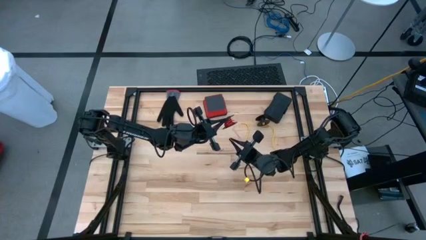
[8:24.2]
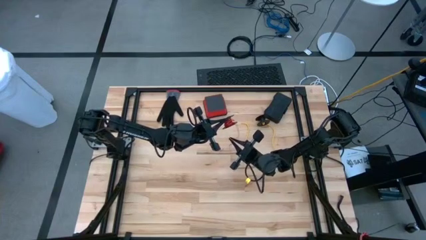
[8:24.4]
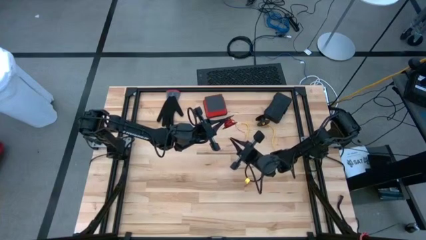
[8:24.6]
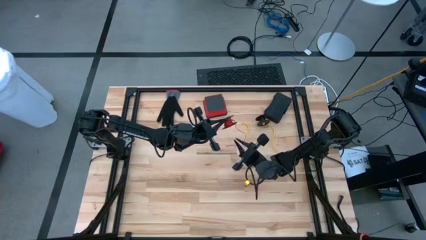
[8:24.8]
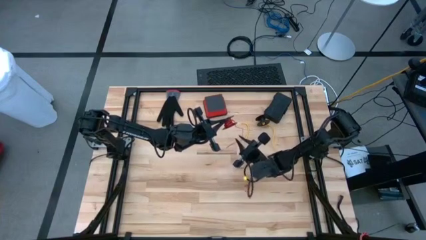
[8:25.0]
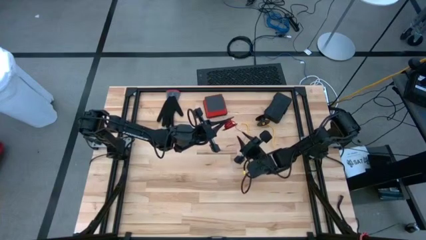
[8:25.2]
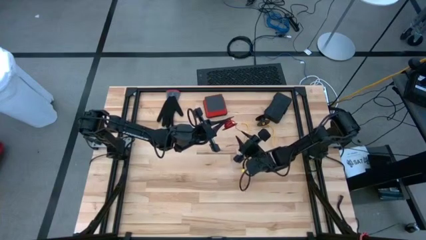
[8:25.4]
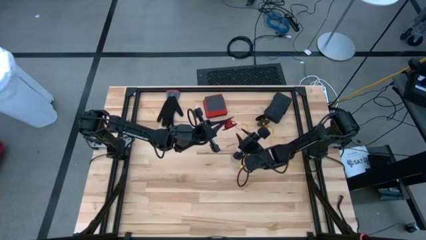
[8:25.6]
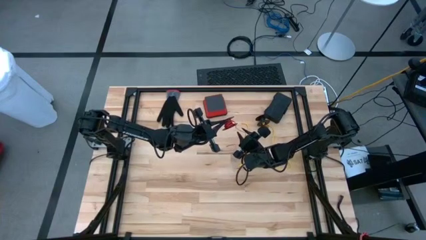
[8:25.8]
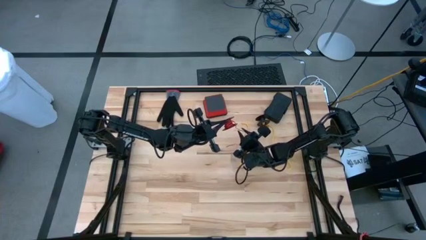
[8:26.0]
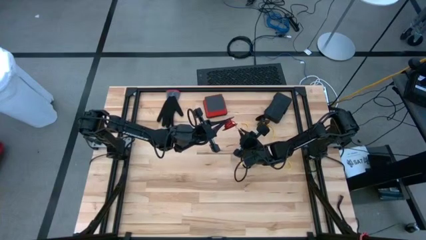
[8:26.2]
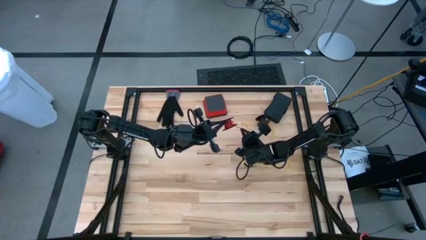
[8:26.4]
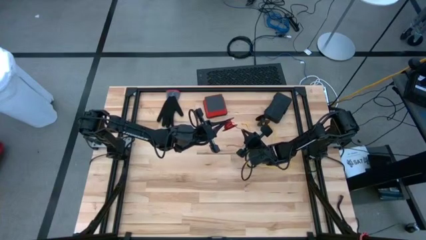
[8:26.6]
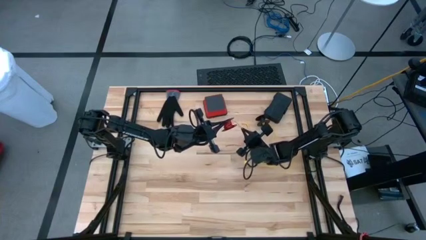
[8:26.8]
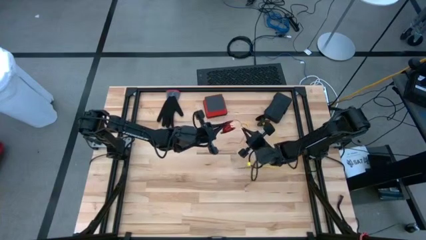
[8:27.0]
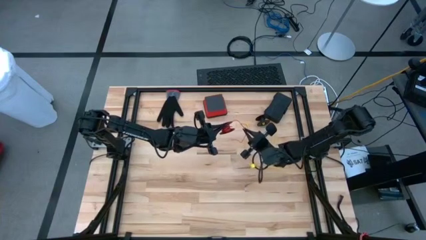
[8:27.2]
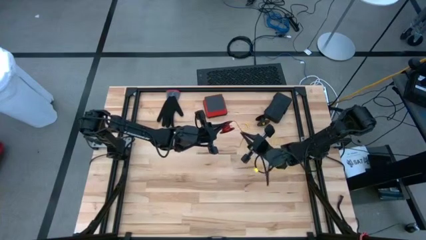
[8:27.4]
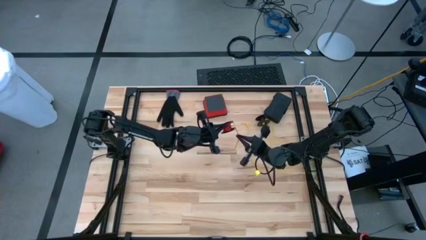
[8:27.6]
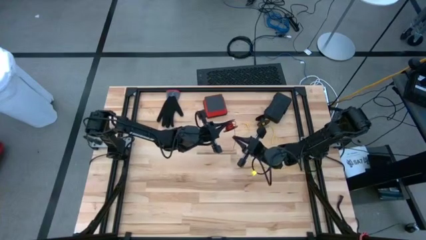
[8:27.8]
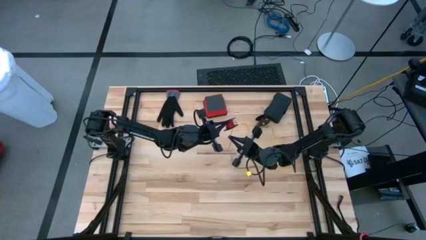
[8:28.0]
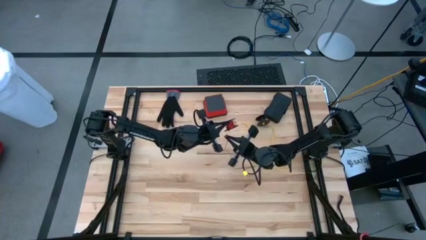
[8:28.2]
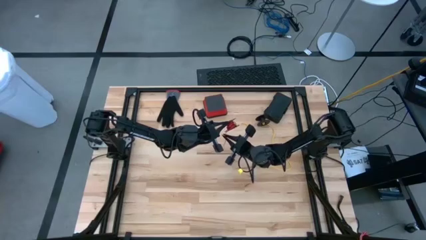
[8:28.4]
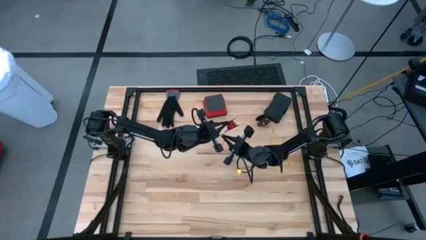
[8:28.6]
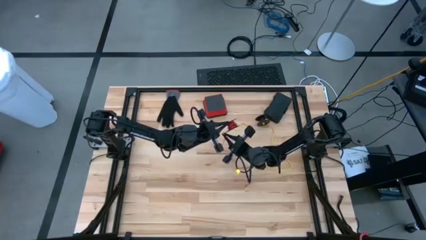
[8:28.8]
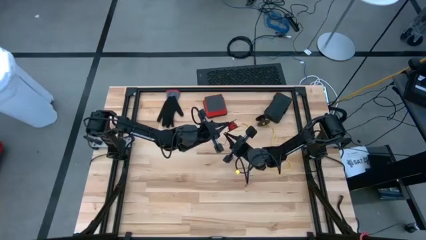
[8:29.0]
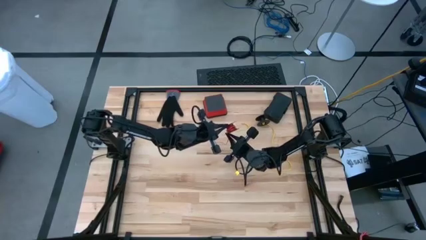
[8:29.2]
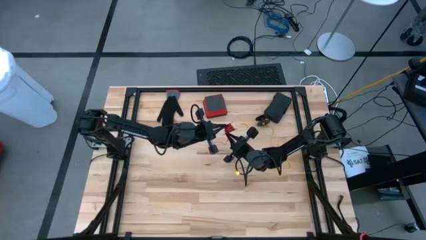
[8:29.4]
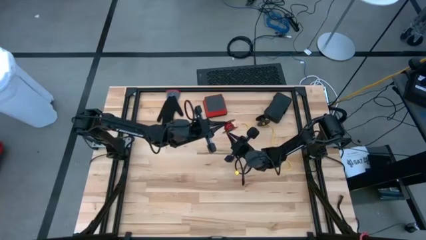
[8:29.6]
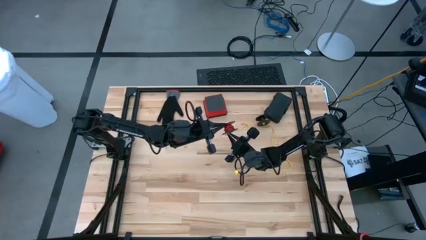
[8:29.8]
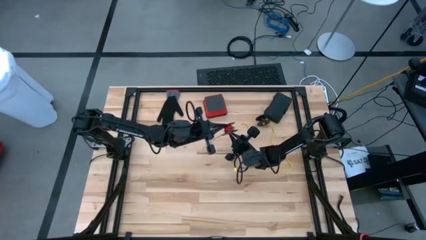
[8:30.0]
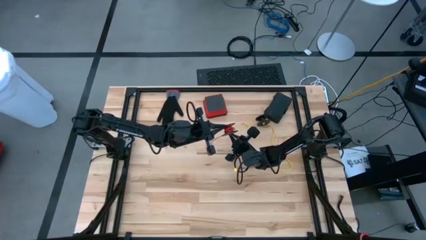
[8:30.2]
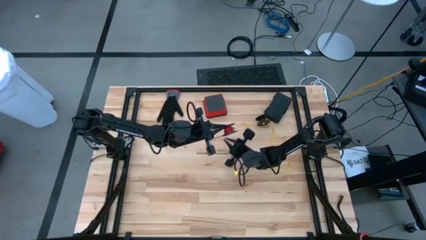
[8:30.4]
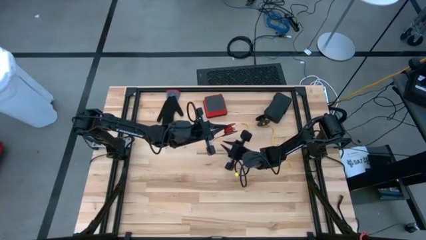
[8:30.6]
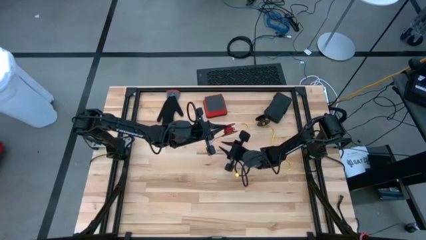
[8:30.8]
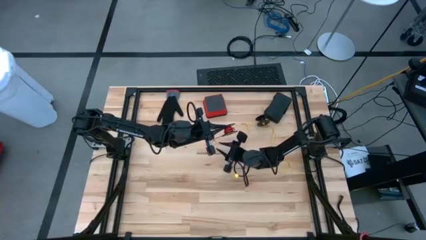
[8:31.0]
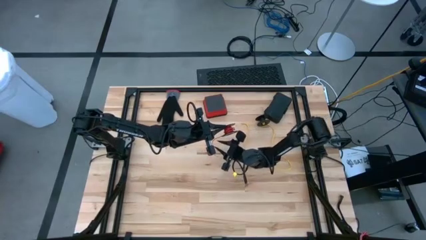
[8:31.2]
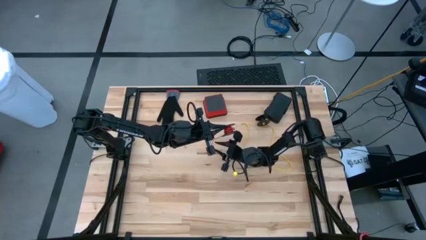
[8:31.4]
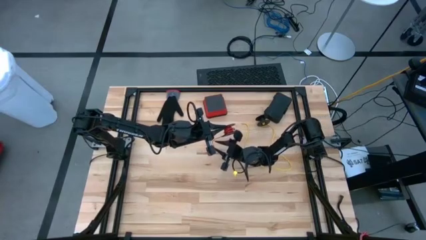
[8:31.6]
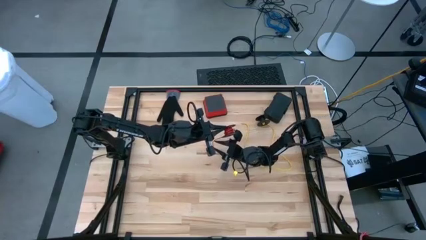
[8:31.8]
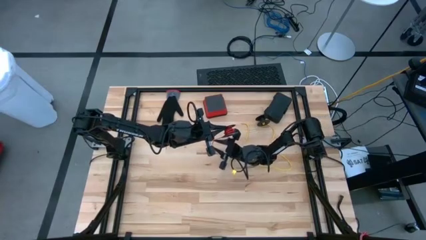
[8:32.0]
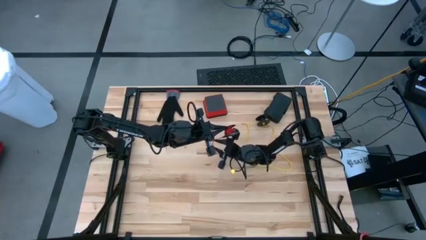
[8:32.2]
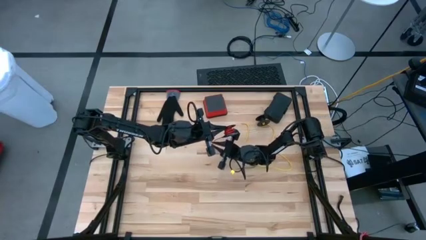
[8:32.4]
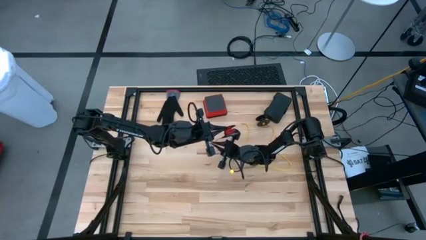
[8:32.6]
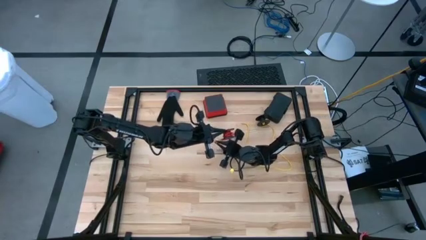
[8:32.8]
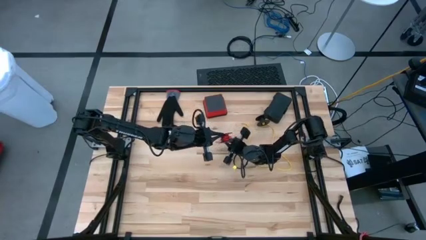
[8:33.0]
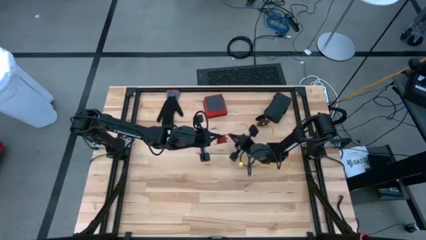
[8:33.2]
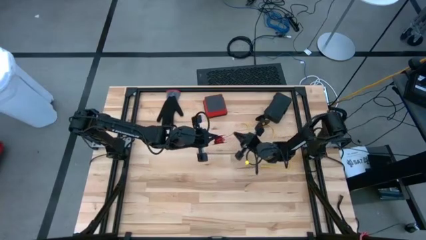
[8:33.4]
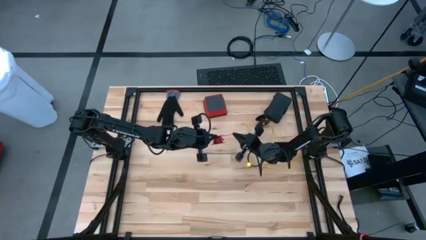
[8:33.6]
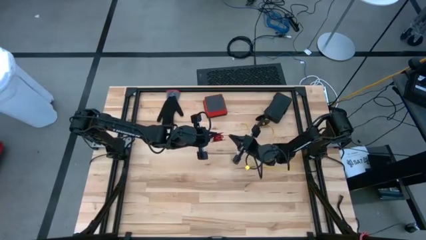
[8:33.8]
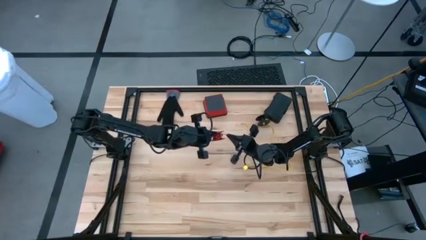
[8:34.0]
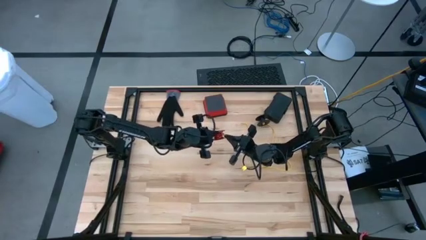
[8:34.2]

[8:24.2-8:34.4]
Task: Coil cords
Coil the red wire onto the spool

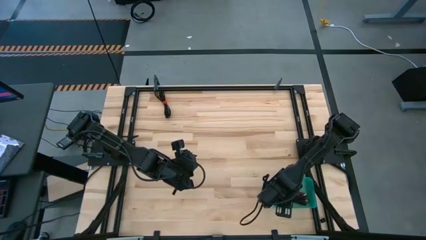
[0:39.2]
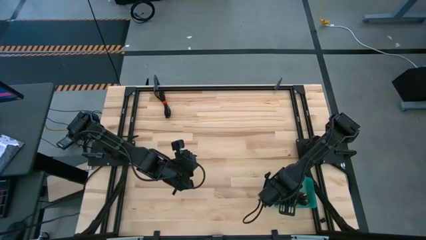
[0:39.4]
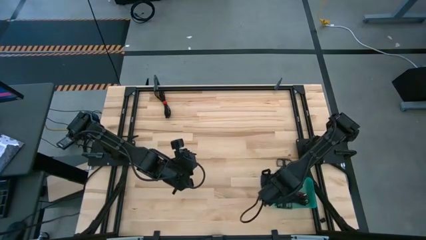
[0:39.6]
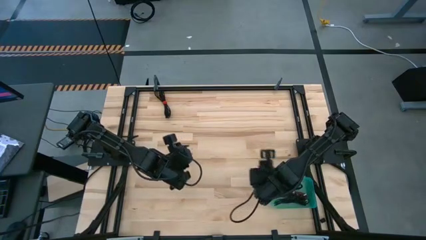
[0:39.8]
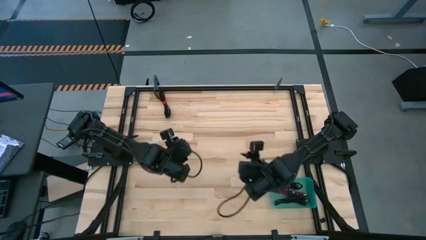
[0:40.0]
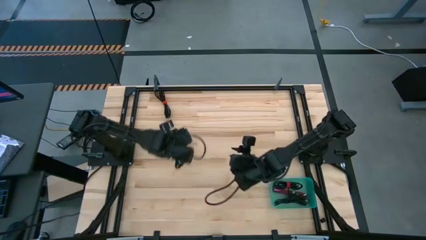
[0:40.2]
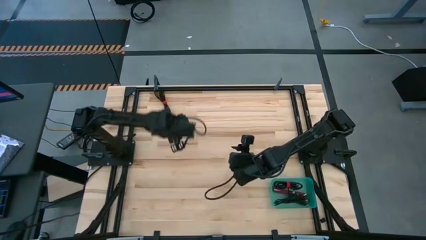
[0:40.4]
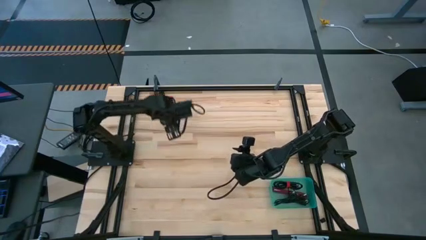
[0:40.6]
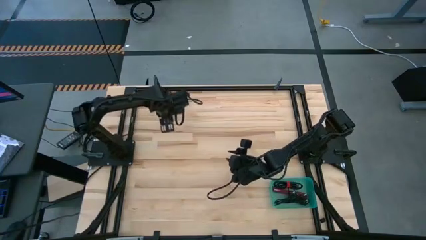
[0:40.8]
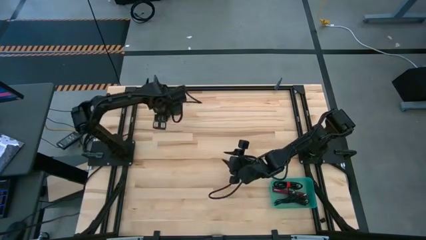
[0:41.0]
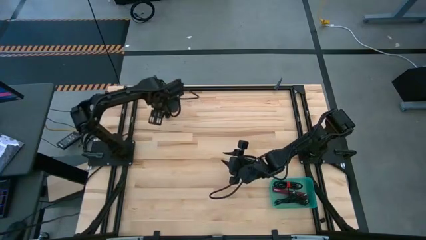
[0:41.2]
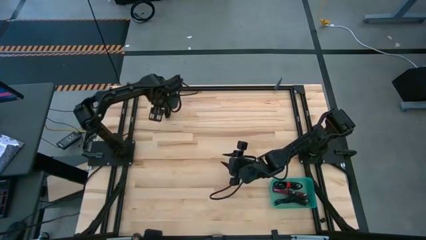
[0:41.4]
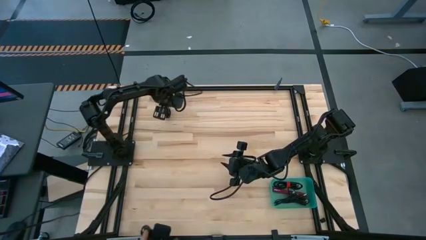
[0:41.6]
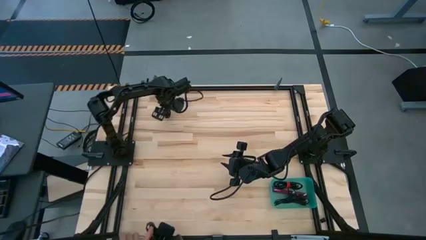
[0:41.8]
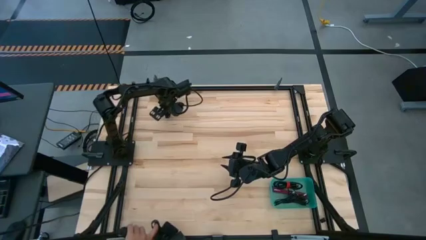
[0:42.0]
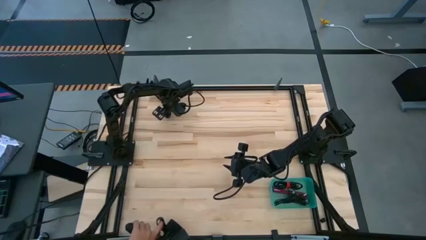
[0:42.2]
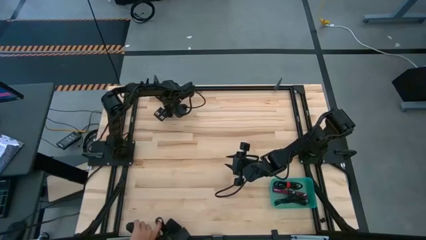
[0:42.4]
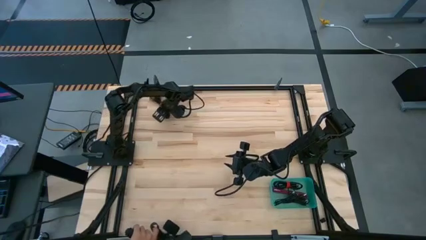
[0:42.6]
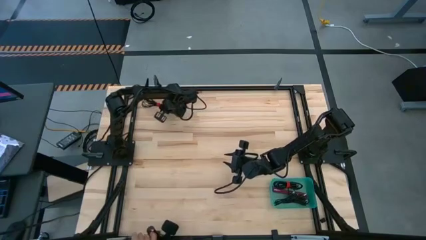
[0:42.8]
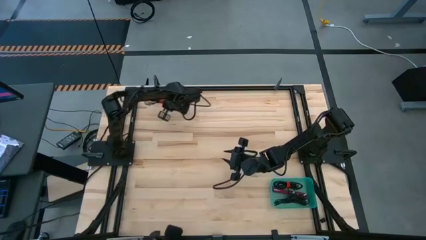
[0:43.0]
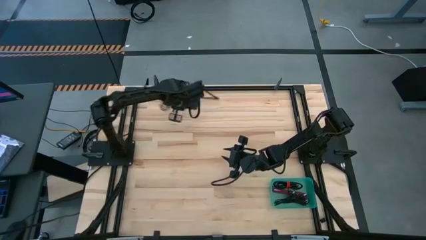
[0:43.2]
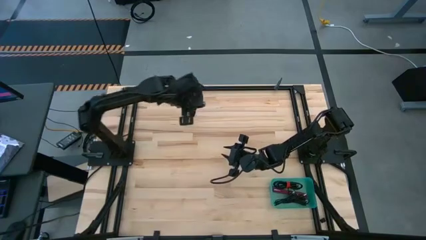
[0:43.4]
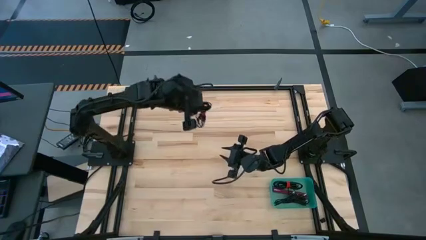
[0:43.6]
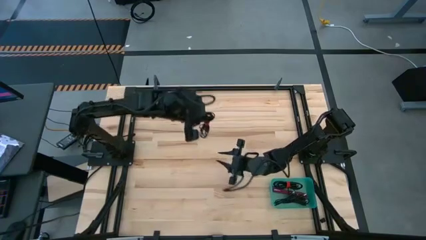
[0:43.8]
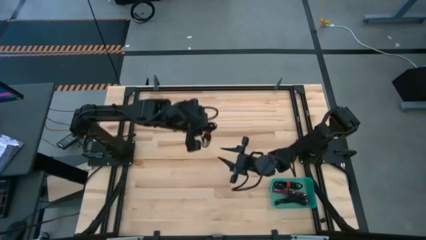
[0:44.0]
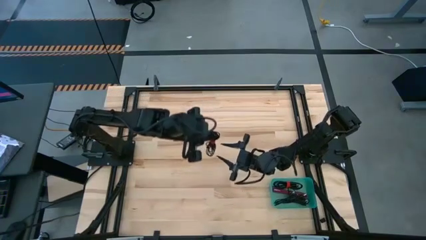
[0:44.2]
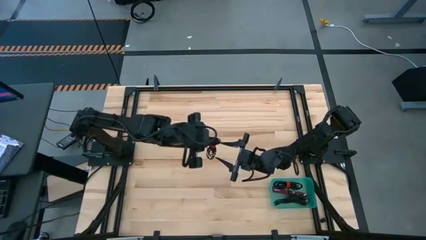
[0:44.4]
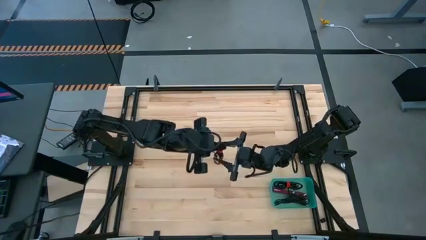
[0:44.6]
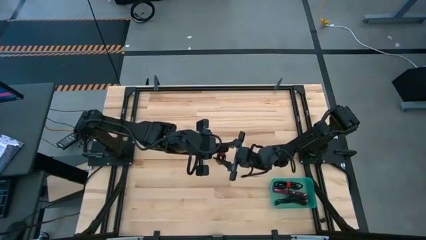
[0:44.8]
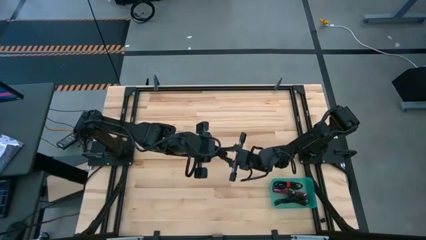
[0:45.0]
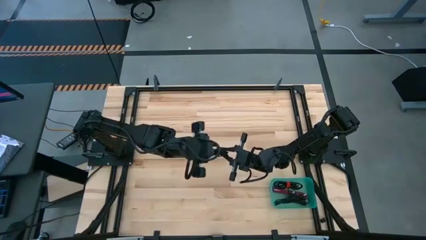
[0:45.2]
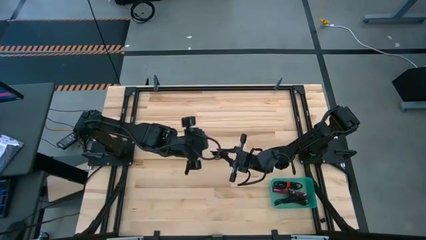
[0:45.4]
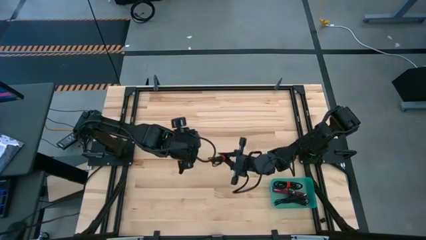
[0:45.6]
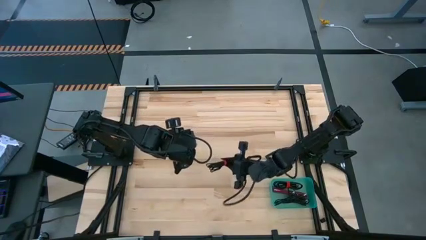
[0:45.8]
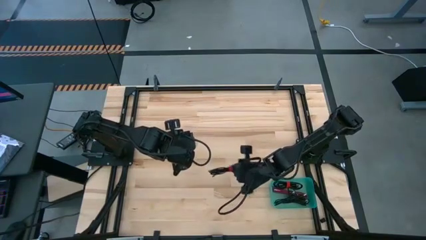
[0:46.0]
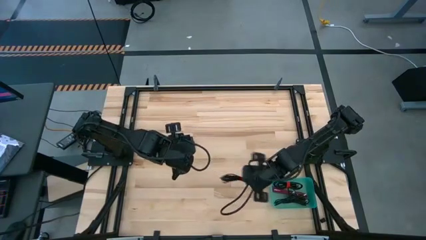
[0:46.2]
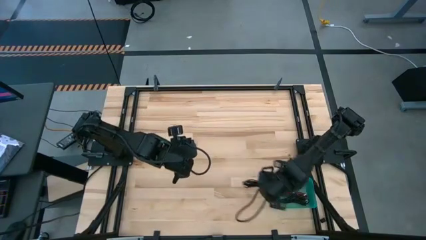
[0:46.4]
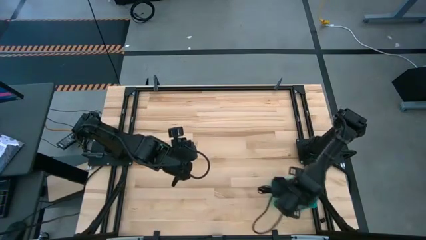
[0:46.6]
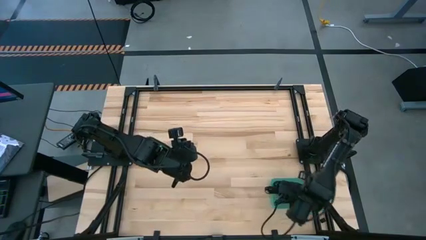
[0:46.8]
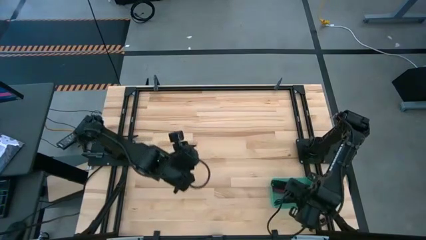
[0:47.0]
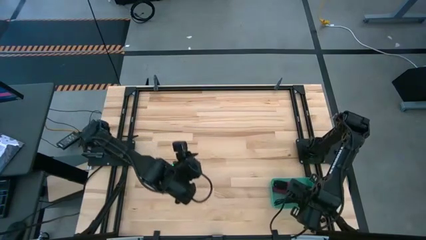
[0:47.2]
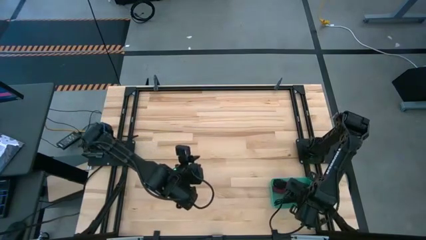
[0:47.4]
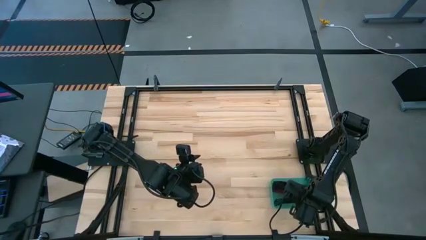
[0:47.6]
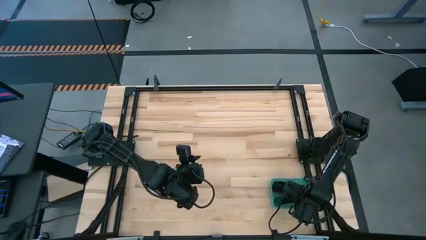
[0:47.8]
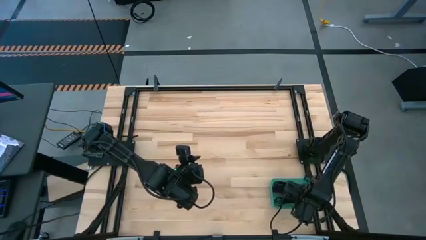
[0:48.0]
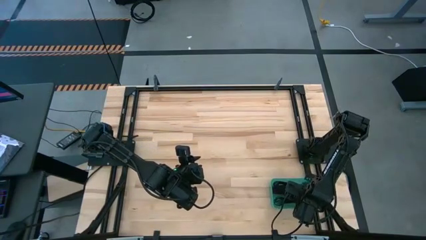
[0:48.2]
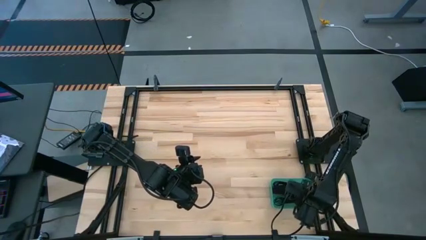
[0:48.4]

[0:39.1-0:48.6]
Task: Pick and place USB-C Cables
Put the black charger cable into the green bin
